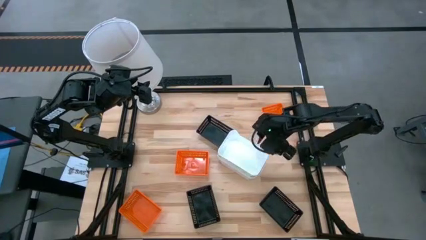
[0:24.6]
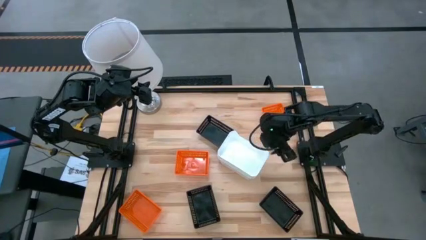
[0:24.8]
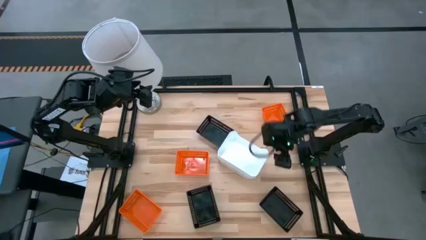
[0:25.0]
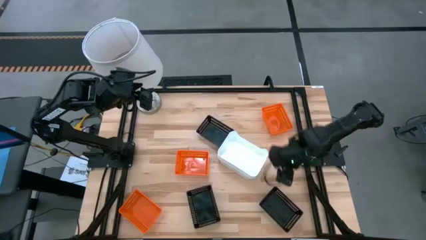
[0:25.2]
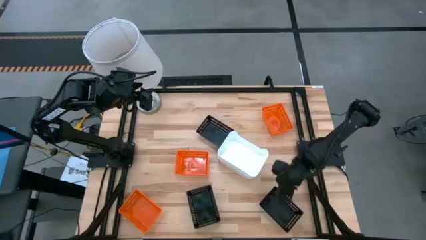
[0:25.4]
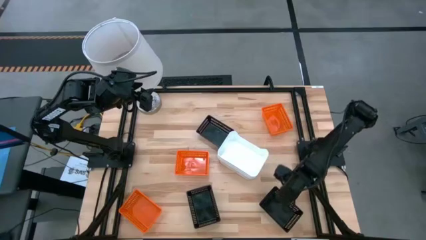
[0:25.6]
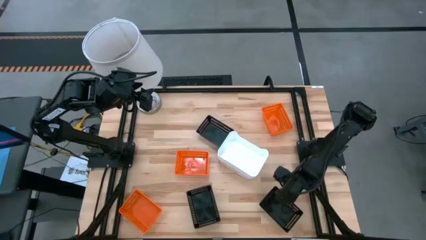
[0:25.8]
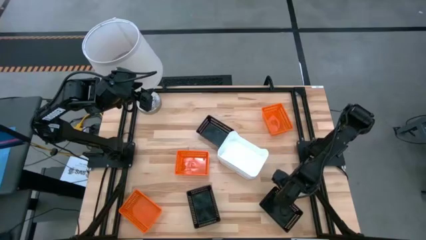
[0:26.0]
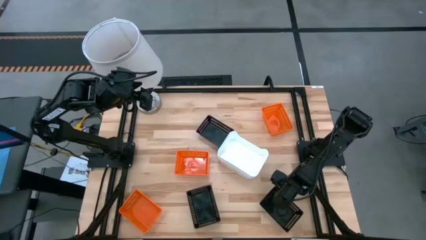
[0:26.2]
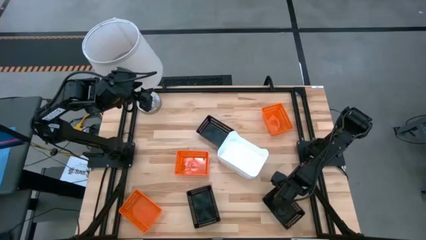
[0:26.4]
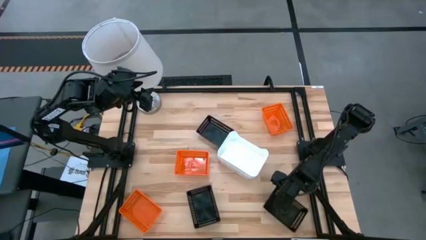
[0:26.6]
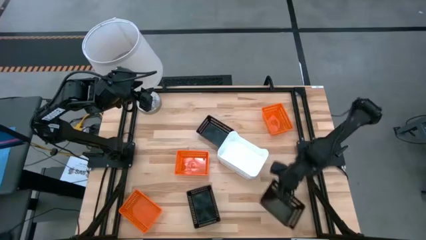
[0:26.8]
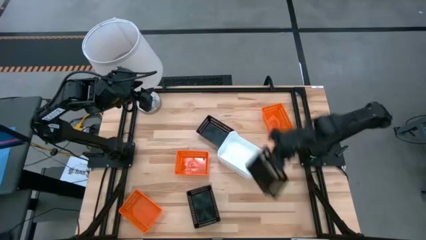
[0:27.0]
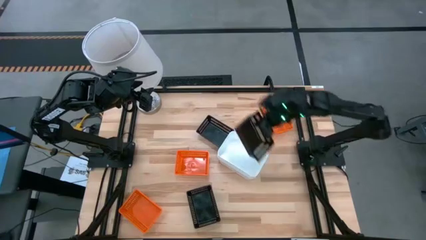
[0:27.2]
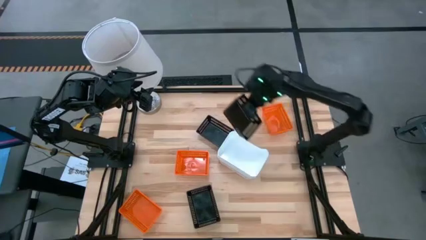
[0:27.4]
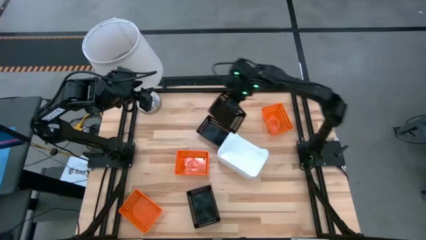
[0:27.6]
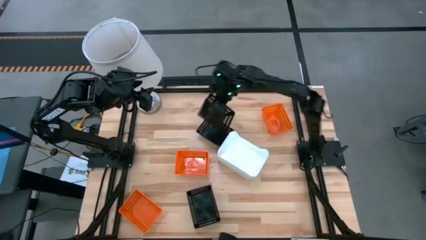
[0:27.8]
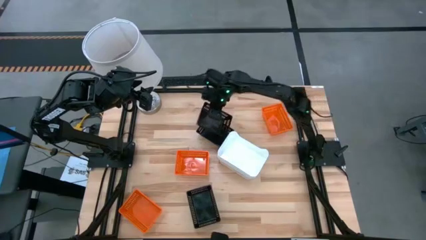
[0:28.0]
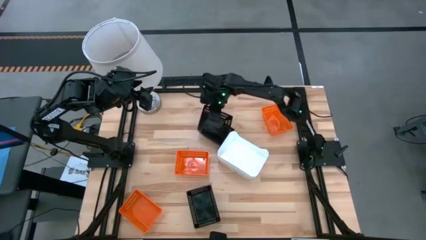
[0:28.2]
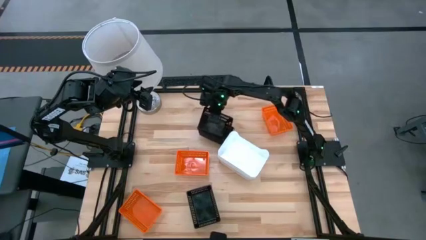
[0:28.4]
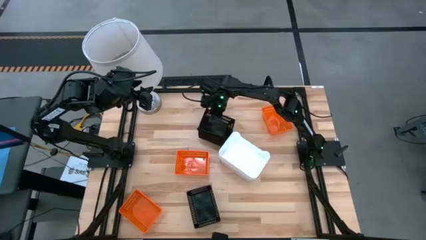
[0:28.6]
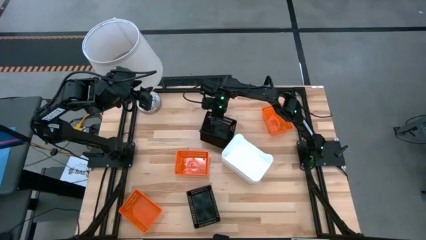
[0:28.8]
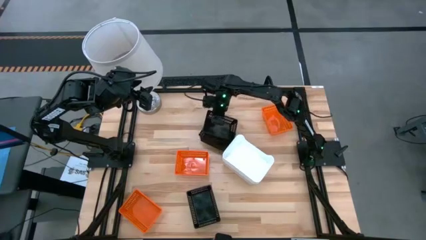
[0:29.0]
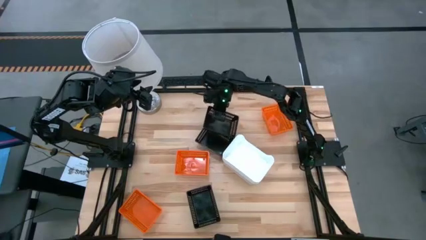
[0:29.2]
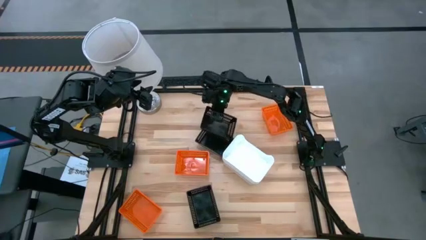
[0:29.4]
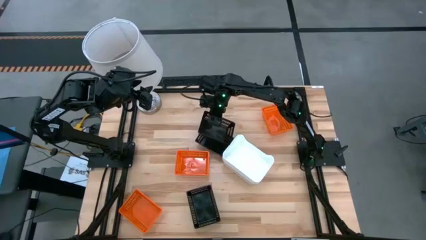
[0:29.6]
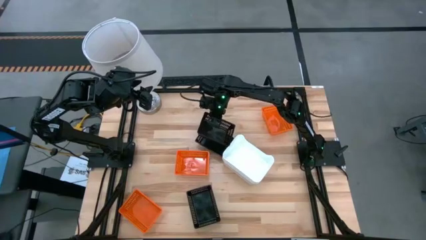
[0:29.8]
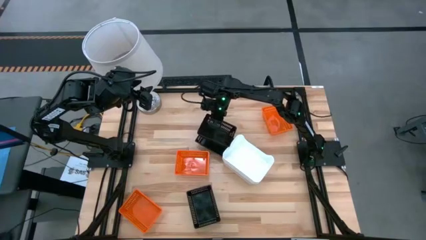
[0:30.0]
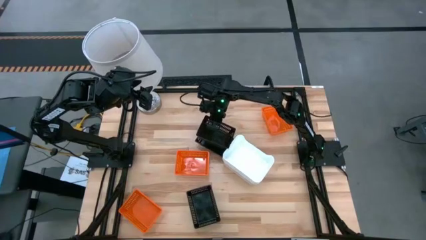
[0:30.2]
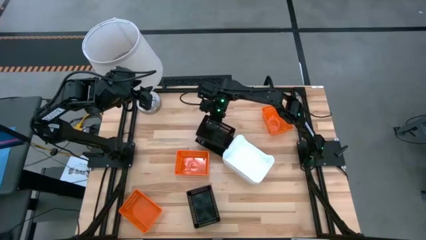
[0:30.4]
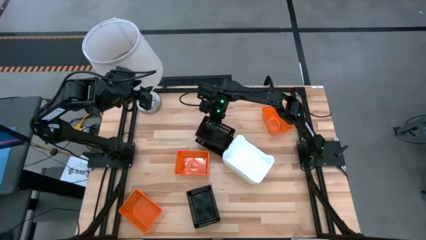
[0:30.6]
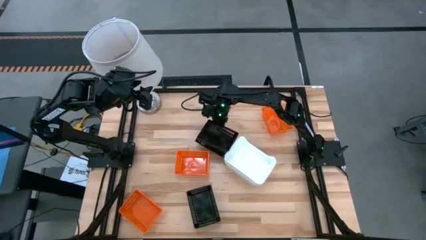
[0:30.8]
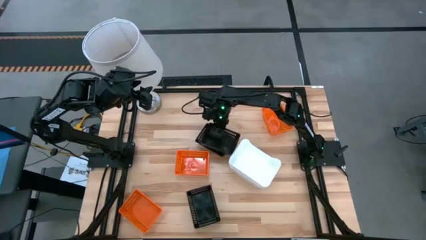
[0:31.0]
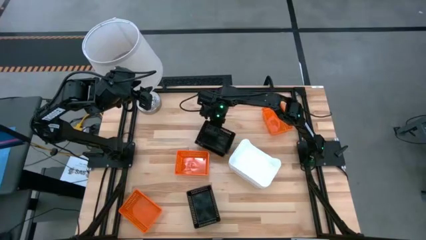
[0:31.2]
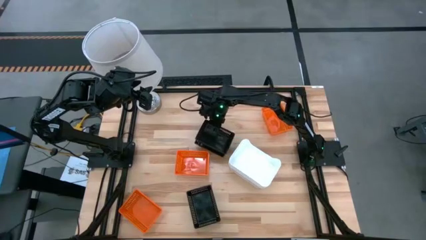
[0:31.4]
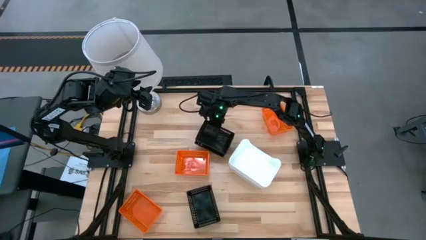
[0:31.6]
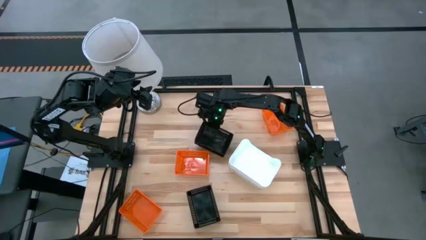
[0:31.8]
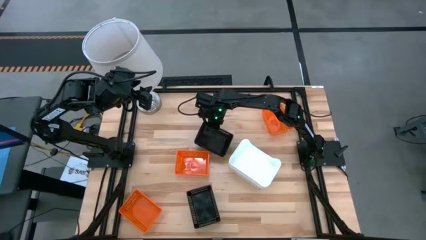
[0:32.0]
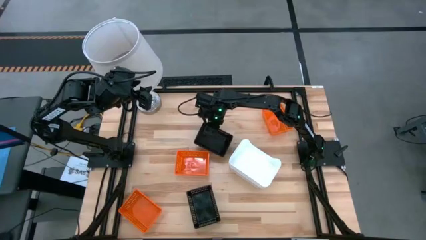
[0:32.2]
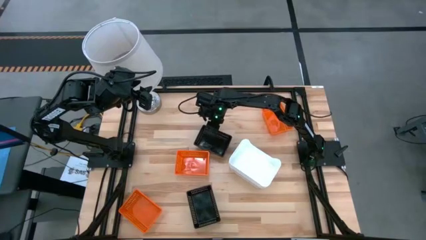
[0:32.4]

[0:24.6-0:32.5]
Stack the bottom right black bin on top of the top left black bin

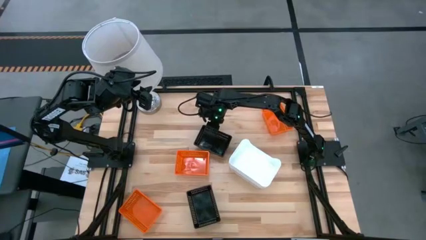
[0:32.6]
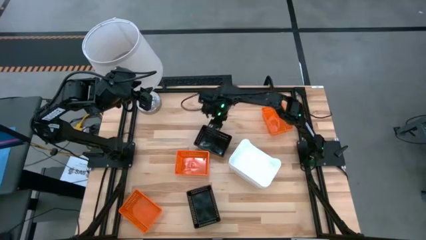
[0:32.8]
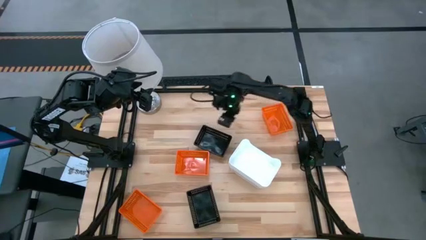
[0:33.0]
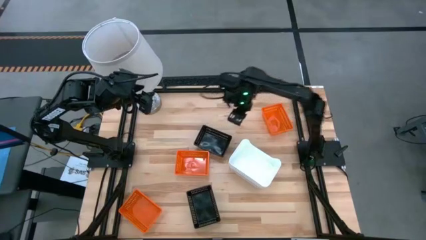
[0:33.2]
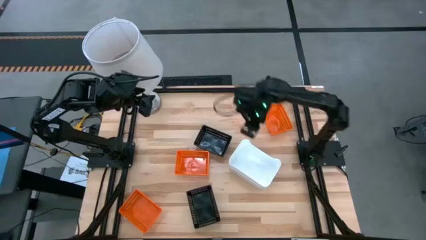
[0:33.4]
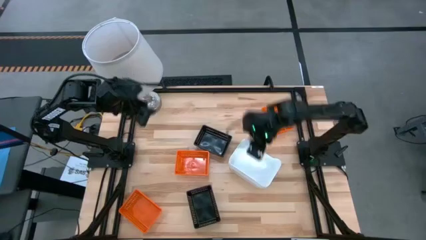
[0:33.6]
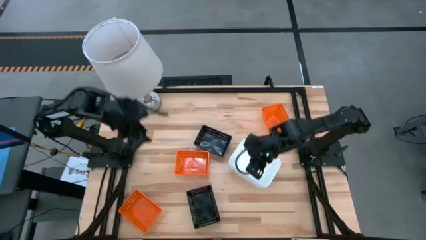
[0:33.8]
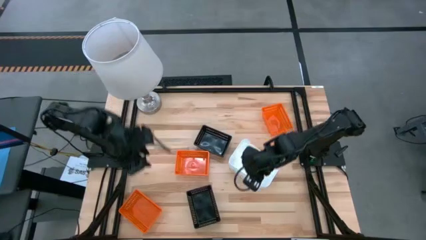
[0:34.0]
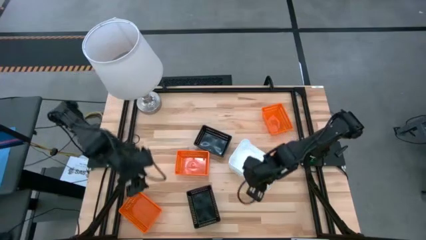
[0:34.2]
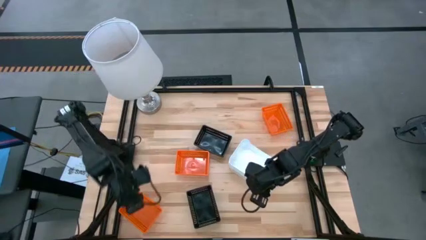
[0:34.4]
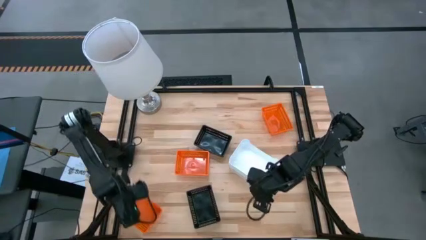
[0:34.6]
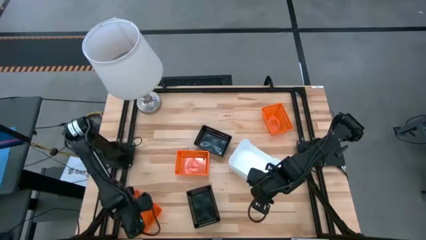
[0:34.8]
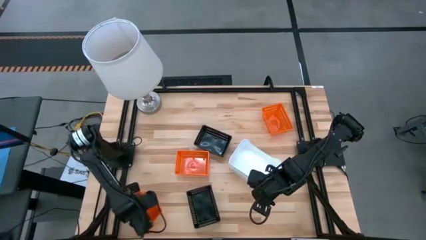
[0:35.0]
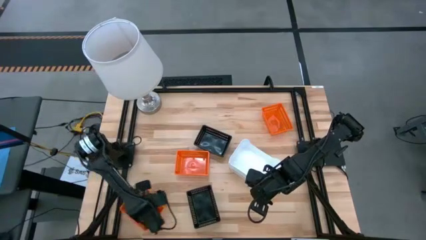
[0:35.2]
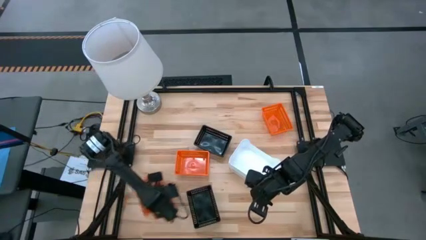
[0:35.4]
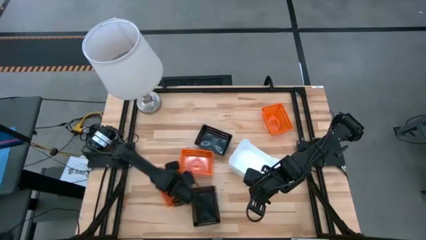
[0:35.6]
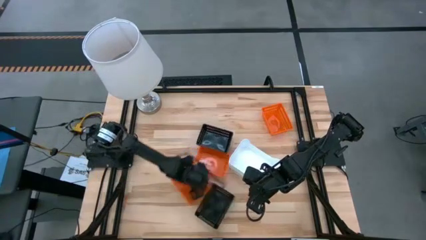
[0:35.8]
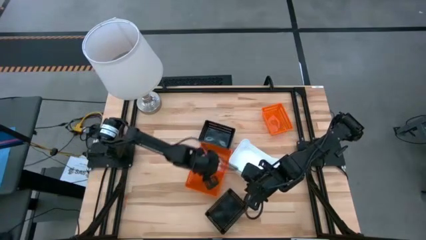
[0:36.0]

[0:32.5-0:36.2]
Move the orange bins to the center of the table

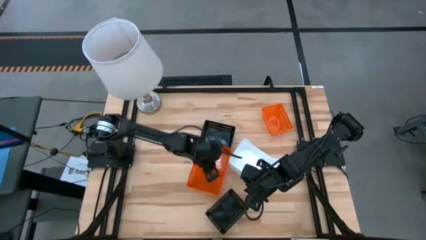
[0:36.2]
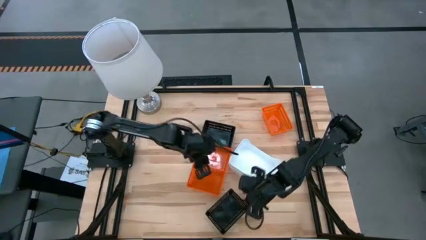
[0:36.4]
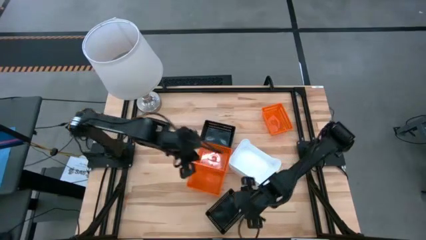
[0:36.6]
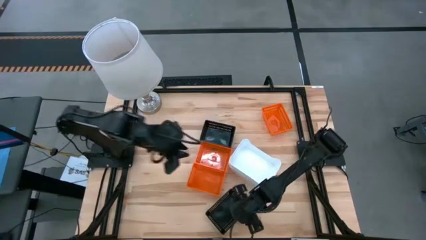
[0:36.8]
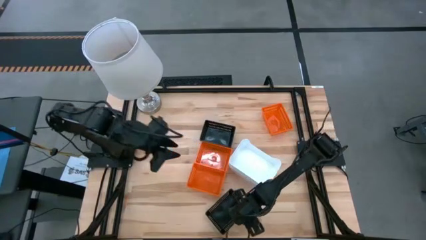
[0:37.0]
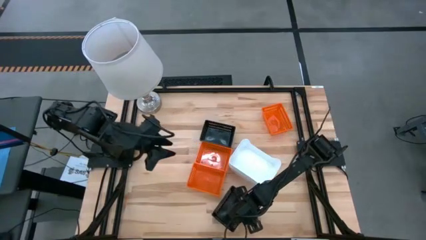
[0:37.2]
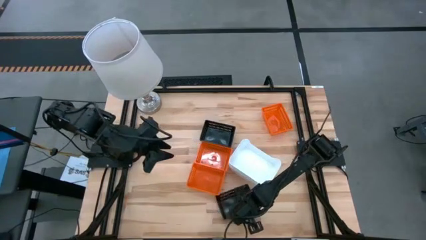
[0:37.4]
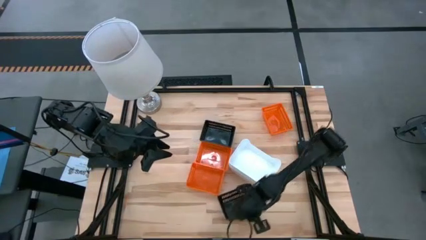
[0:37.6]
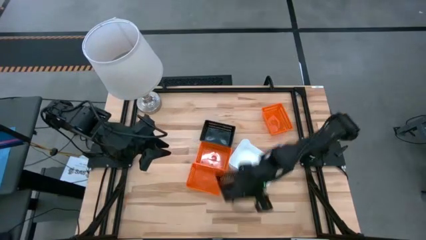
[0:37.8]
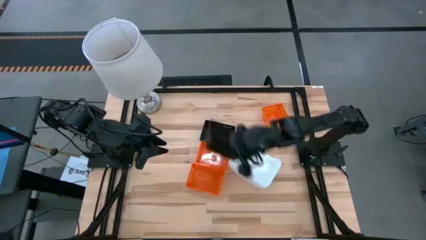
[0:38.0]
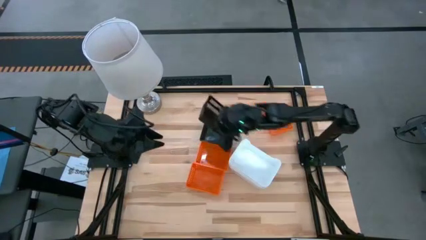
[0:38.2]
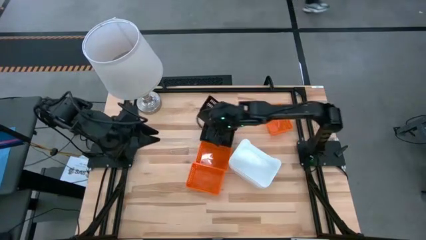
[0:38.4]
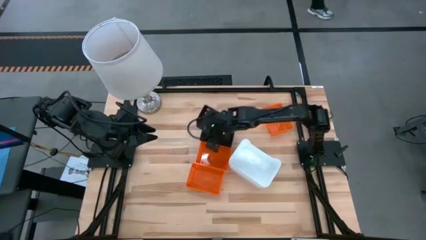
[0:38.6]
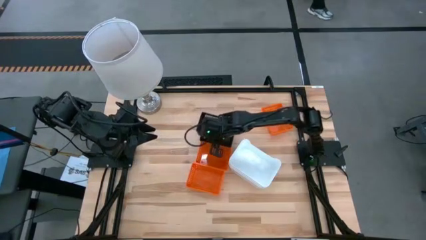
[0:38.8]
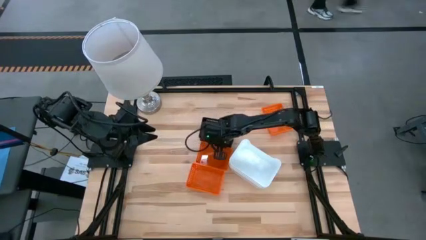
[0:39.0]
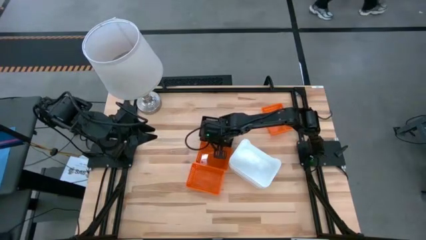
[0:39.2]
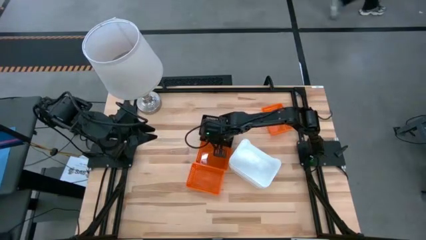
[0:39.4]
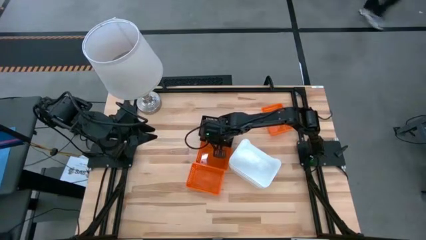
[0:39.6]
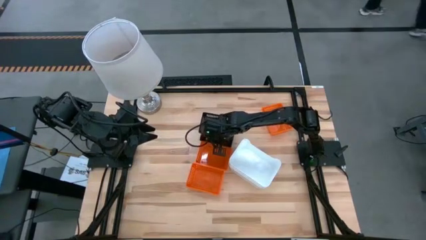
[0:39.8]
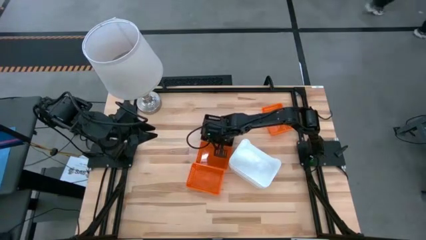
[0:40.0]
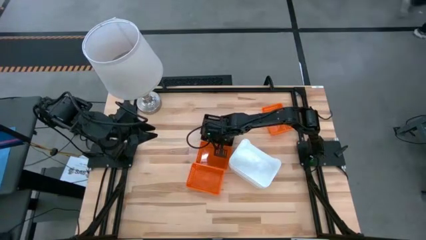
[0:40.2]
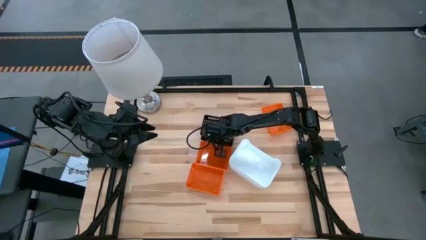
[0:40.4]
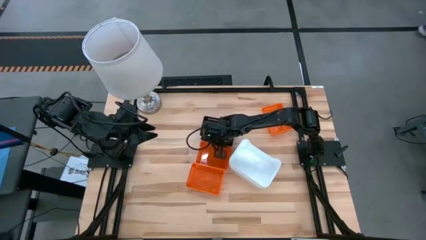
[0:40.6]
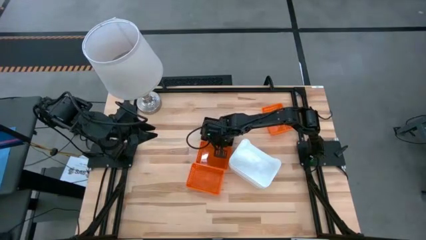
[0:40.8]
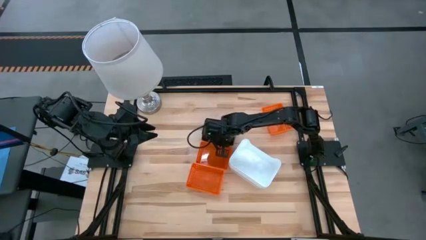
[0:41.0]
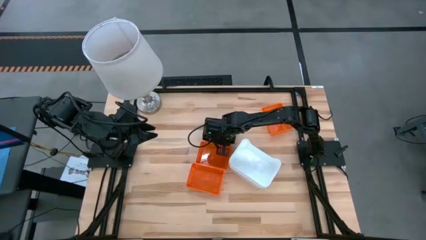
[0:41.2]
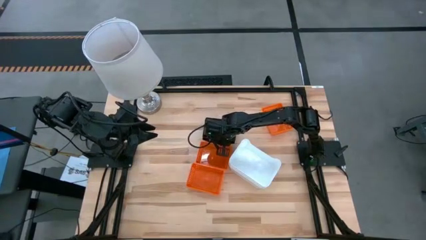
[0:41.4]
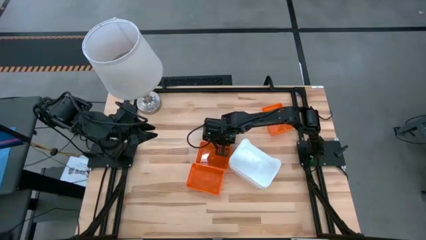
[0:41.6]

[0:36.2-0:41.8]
Stack the bottom black bin on top of the top black bin
